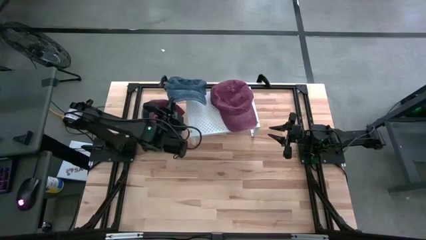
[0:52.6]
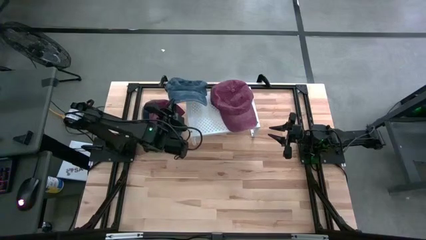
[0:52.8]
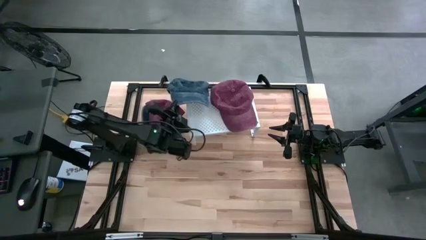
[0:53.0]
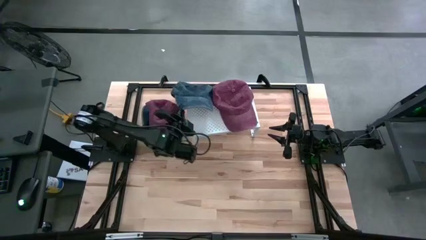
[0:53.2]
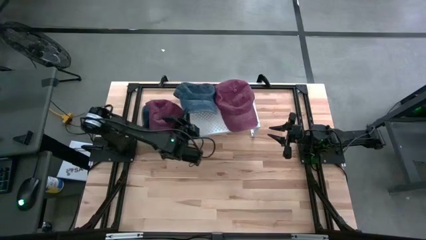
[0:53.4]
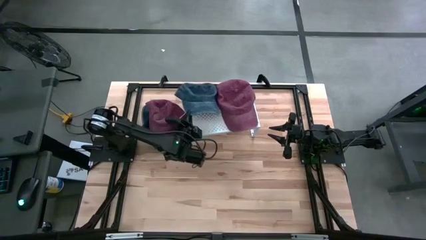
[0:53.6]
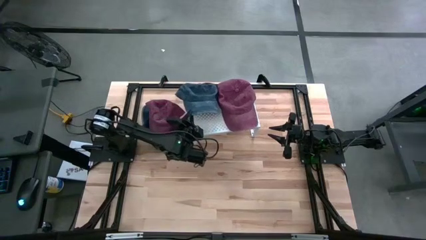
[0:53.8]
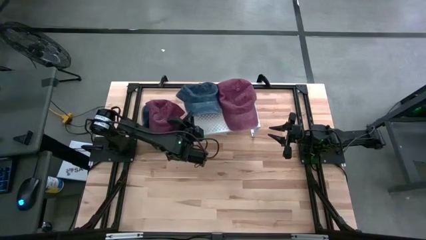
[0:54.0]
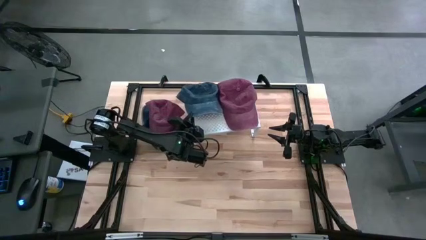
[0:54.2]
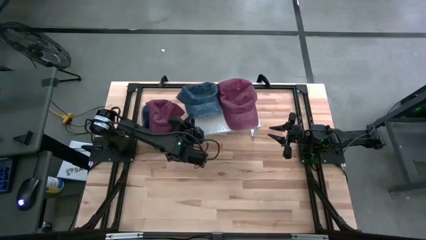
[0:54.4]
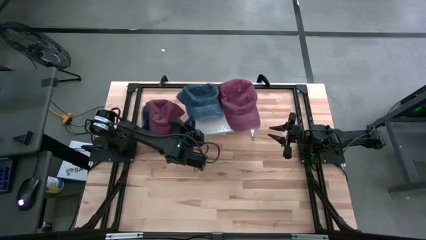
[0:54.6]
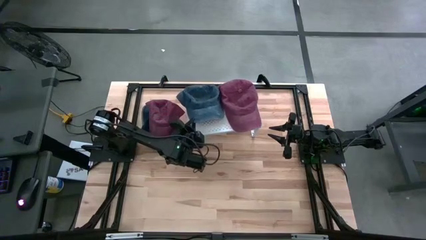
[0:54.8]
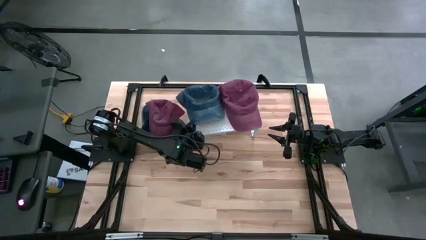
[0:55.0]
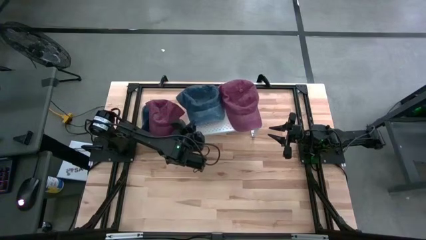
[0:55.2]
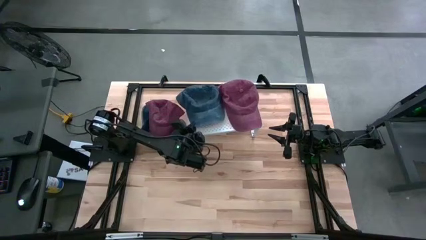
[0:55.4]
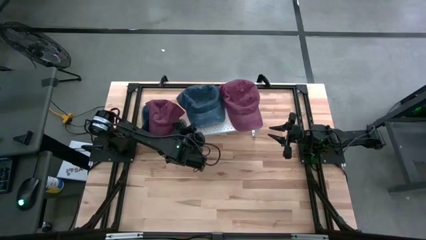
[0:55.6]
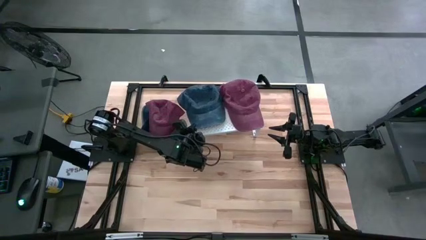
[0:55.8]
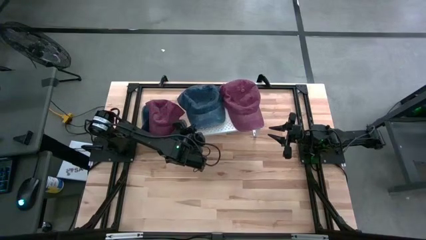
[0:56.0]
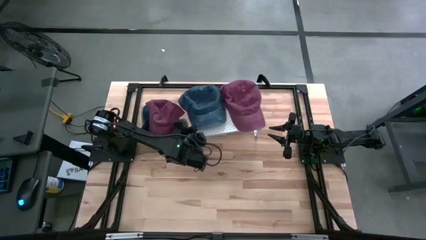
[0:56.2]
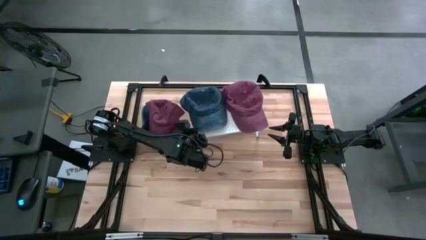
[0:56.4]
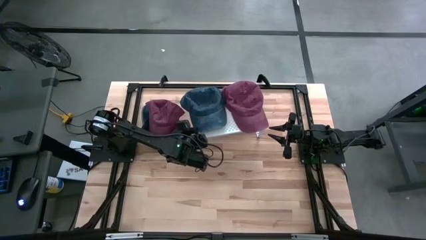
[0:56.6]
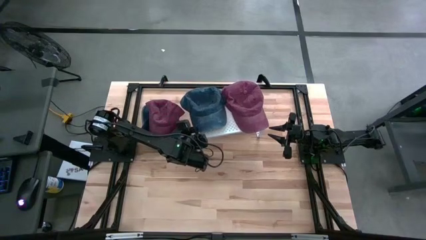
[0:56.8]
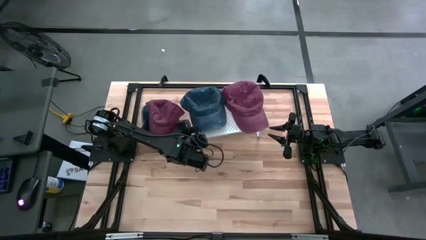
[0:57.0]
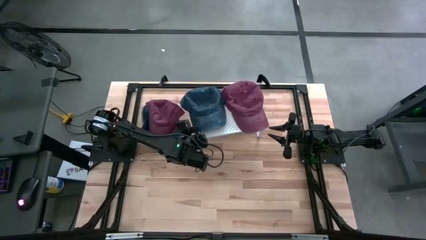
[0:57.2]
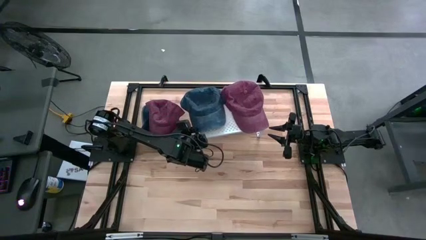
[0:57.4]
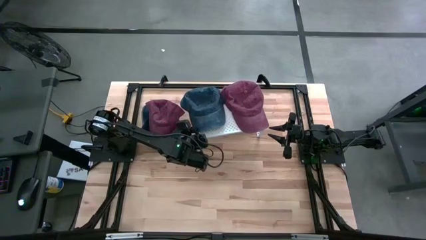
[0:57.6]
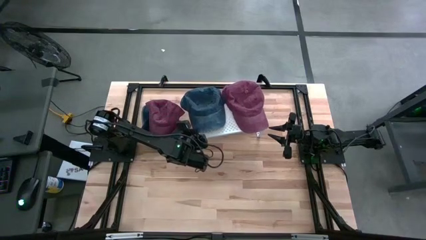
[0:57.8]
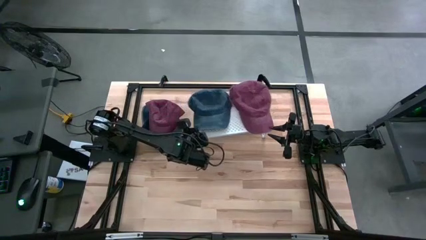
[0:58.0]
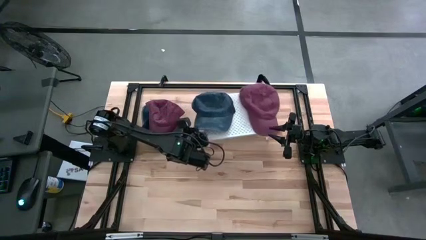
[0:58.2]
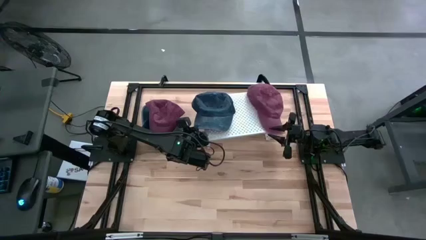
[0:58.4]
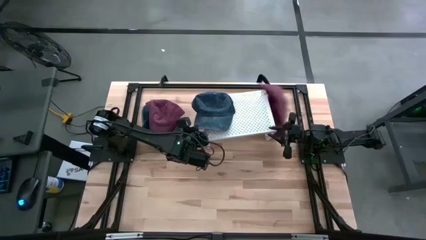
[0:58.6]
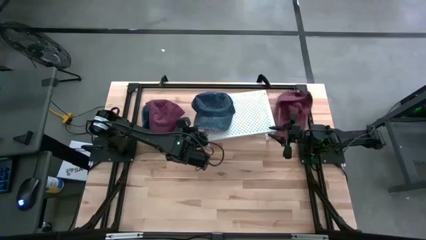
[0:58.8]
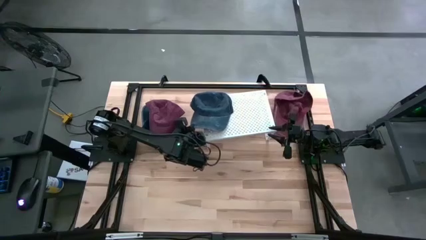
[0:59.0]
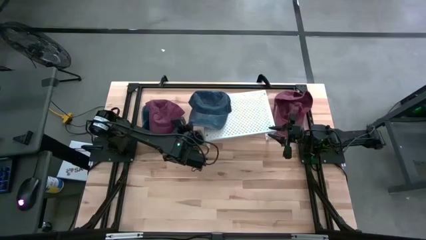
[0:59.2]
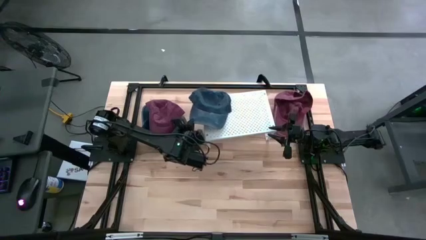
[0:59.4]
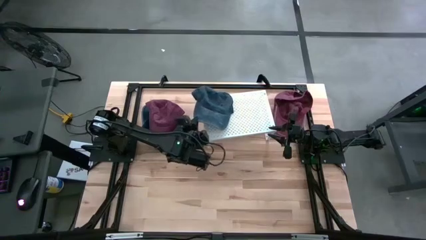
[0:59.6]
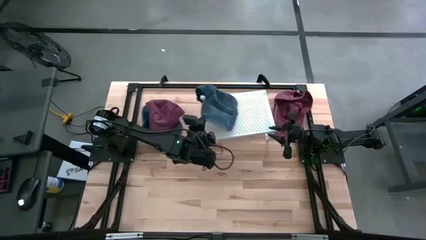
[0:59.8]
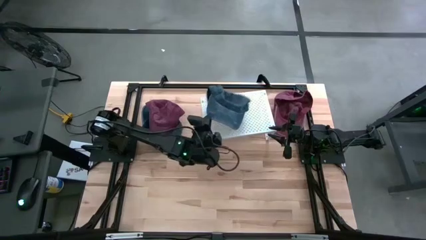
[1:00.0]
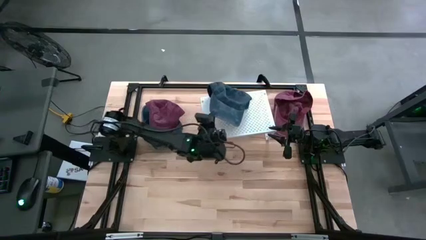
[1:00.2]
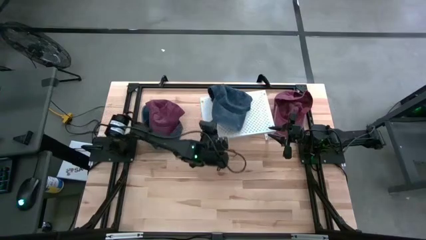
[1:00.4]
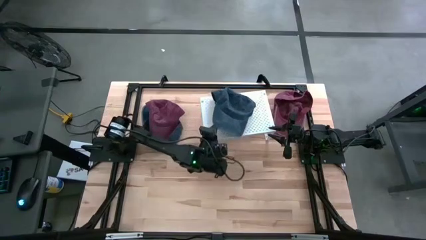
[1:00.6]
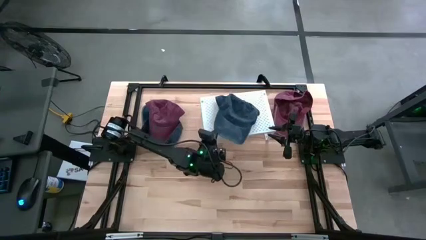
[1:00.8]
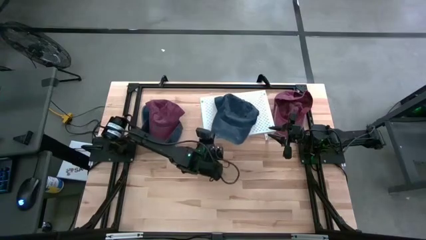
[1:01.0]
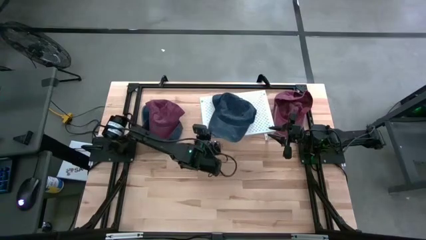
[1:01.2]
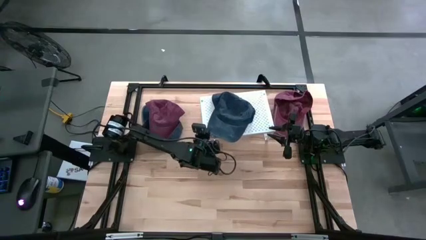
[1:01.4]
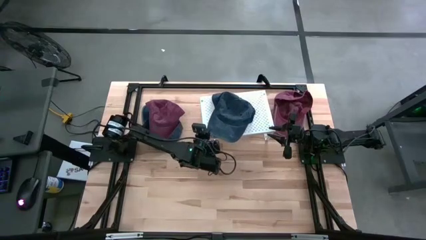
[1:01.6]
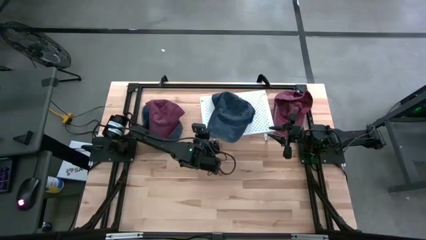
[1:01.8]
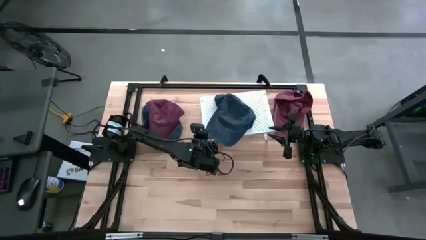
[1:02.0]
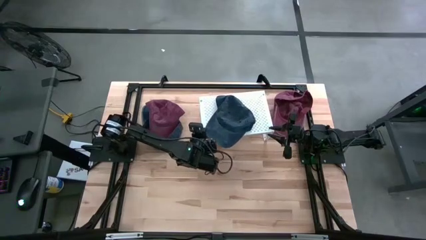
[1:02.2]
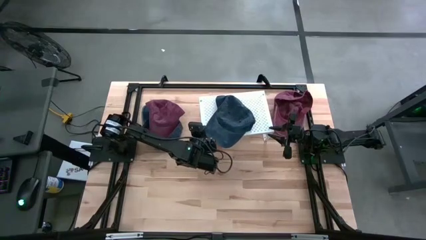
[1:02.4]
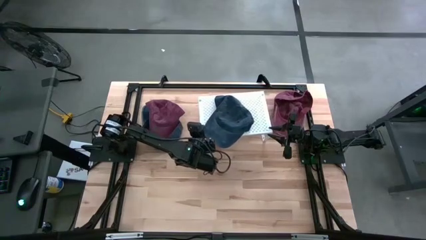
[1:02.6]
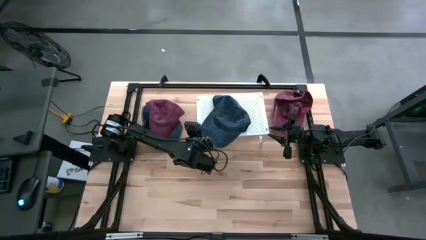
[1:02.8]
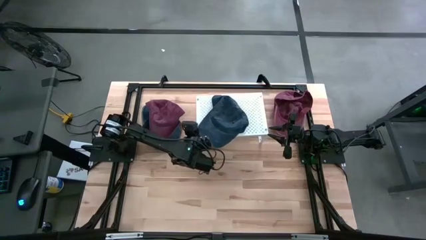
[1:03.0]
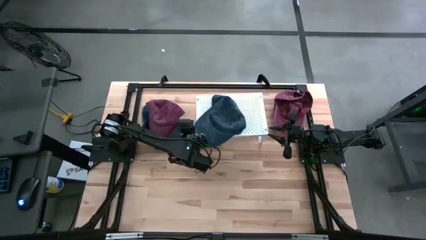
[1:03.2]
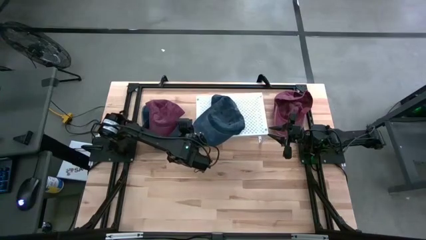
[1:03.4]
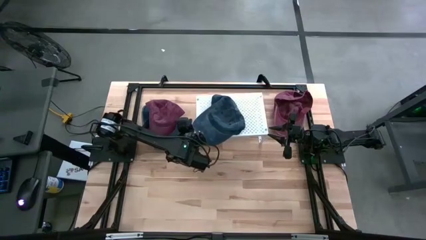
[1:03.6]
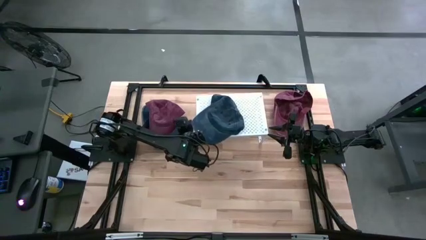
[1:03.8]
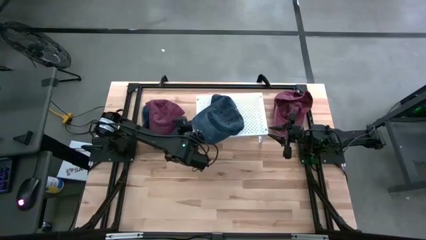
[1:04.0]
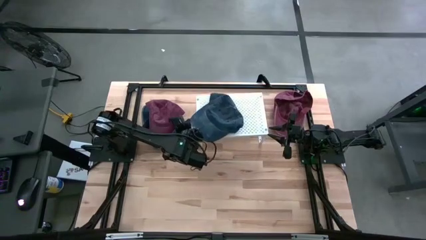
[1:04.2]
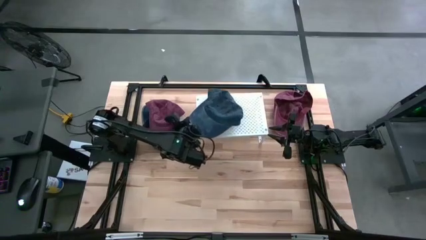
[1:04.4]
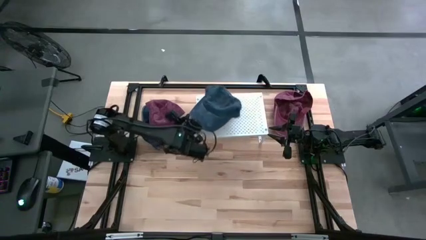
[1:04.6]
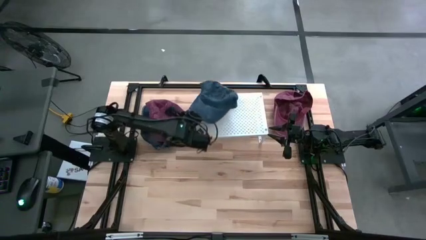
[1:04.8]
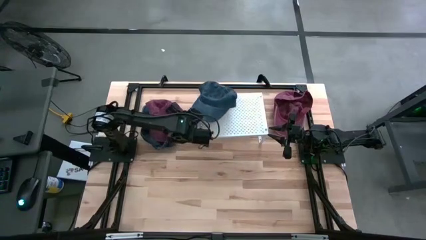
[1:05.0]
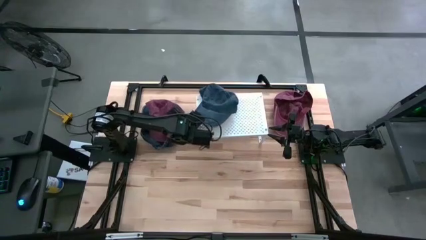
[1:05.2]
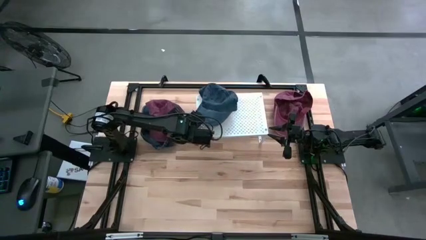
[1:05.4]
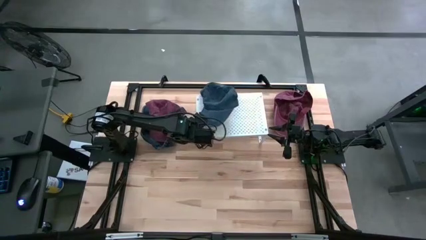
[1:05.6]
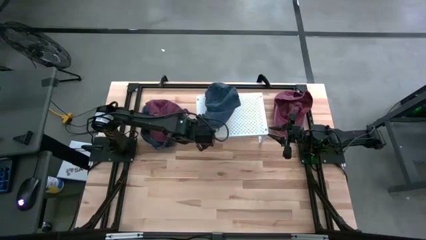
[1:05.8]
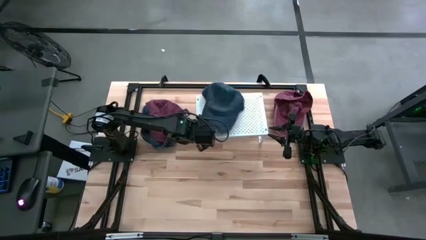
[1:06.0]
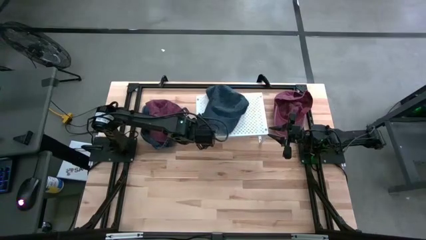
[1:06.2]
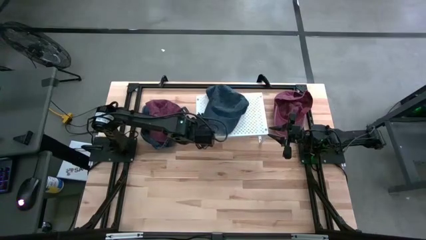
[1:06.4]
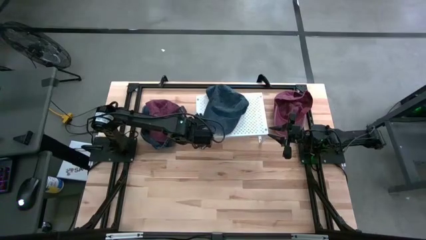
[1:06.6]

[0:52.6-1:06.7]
Task: Pick & Place hat
Put the bottom blue cap on the shelf
